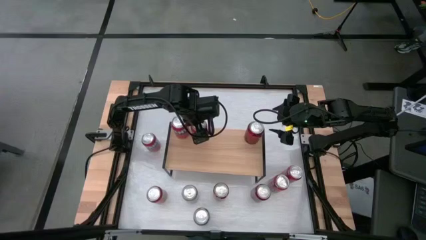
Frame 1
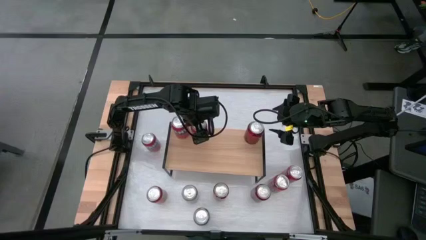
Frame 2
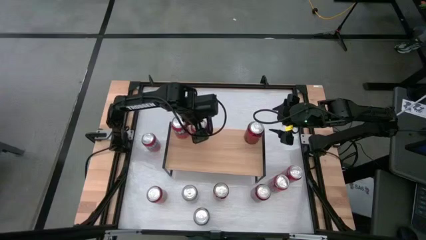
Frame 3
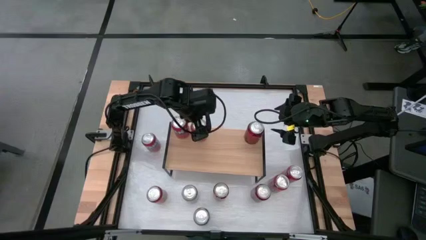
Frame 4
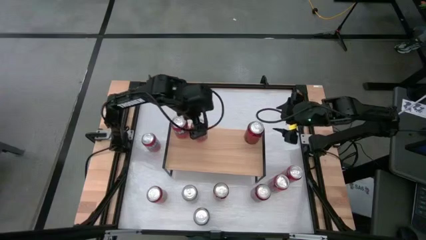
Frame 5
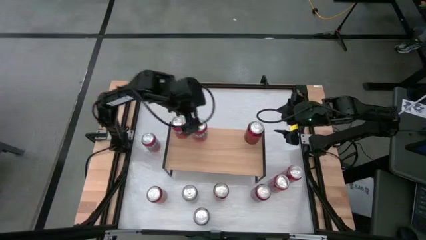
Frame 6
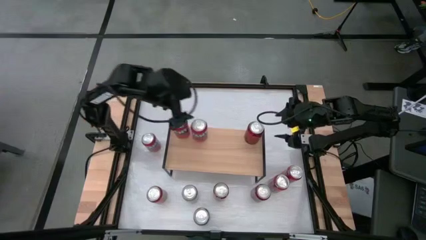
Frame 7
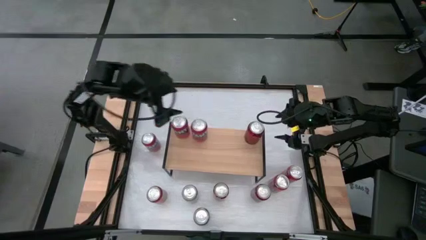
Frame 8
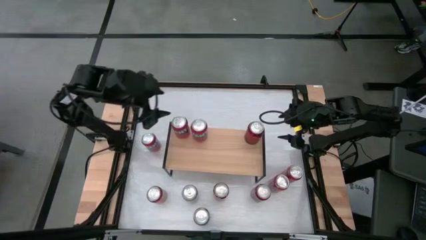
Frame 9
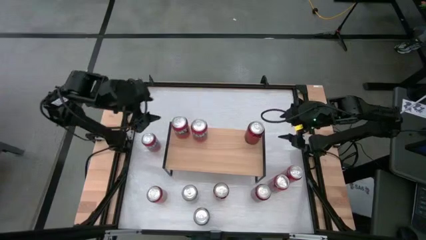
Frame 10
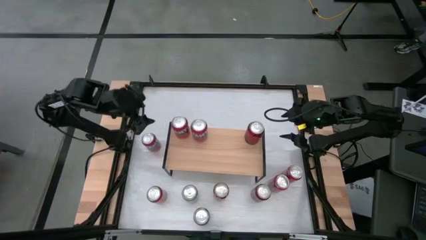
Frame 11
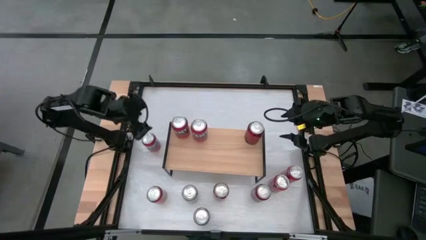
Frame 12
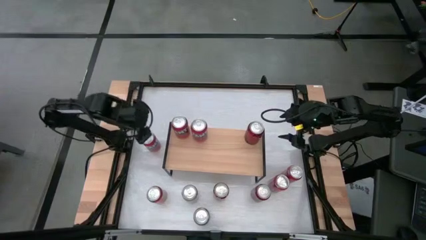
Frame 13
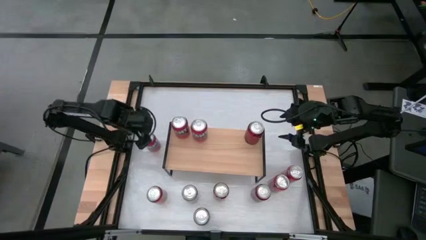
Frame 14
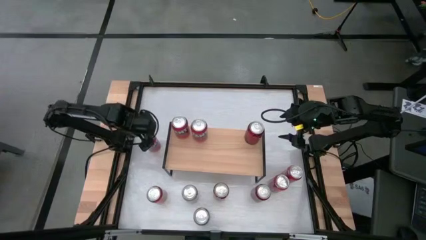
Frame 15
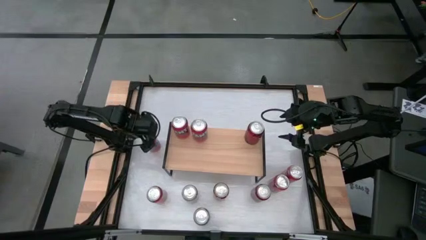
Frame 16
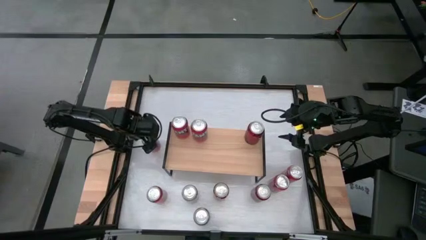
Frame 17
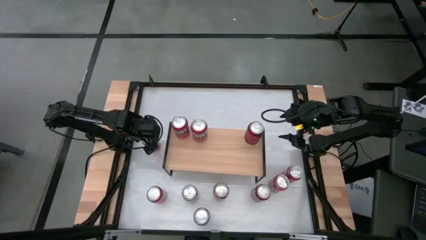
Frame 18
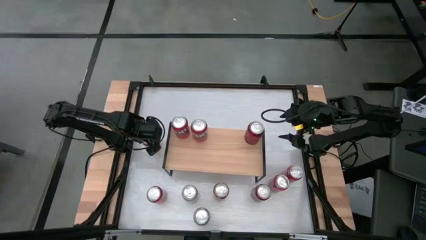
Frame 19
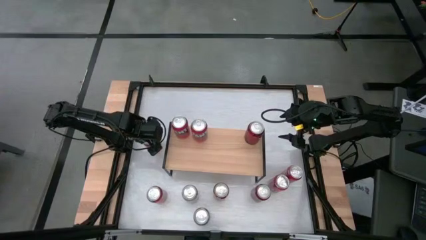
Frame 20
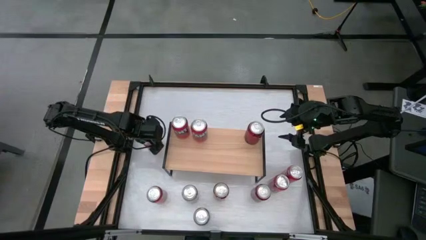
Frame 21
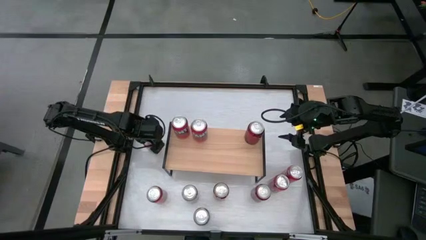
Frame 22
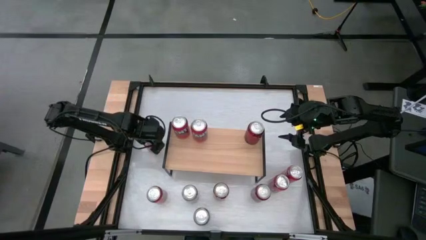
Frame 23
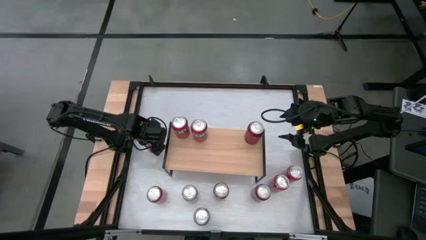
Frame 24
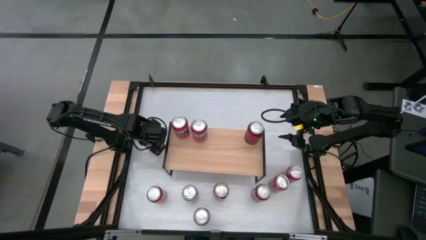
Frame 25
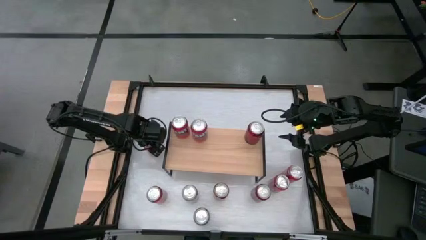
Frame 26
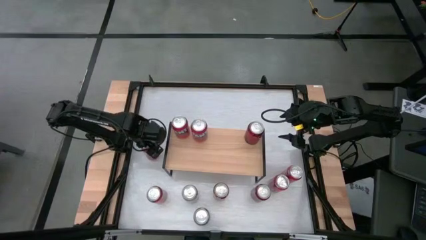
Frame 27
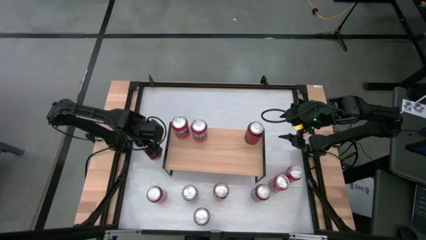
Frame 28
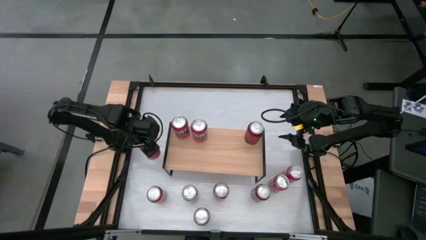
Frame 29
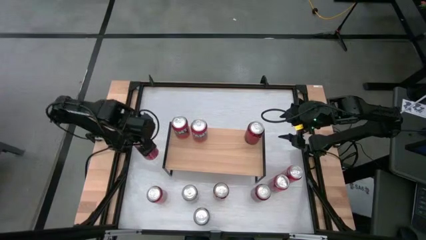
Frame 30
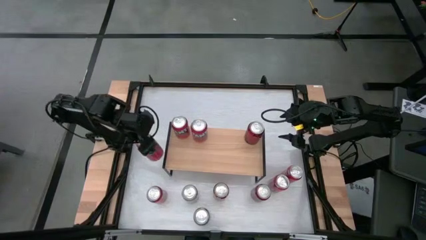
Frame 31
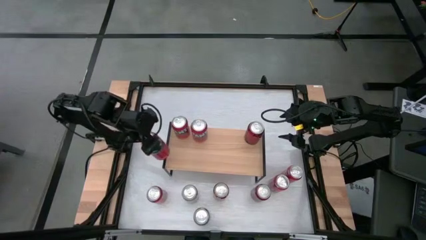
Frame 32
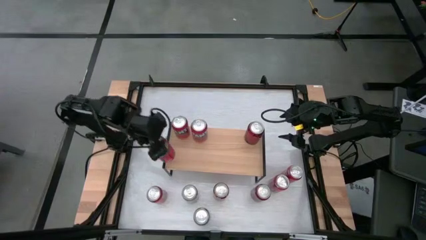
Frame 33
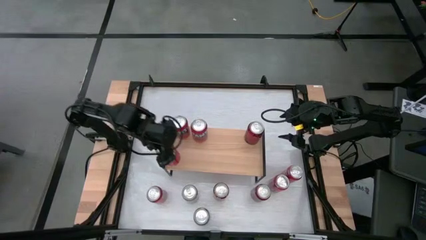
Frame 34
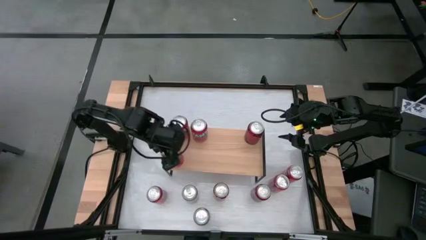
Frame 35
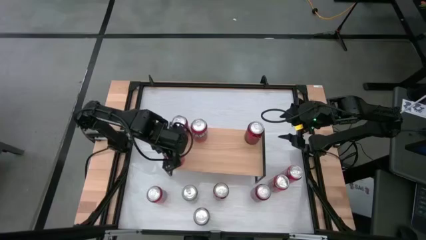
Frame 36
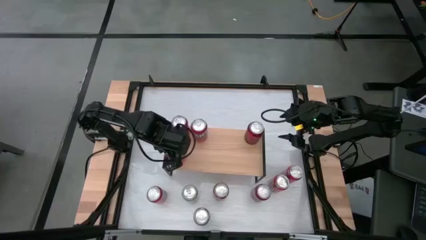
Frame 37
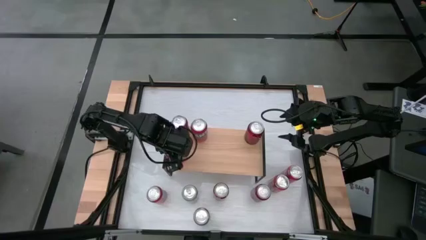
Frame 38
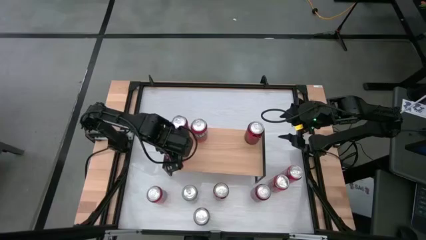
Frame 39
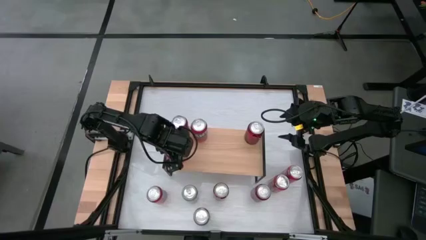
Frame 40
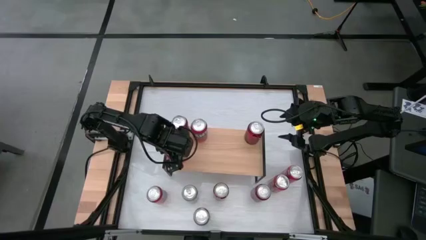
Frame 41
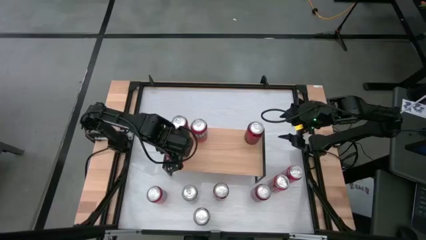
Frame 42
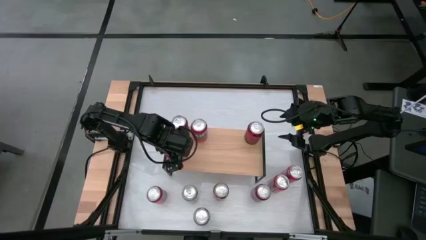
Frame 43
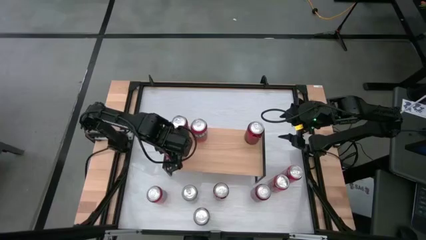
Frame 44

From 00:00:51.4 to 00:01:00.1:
Task: Place canned beverage on shelf
Put the red soda can on the shelf

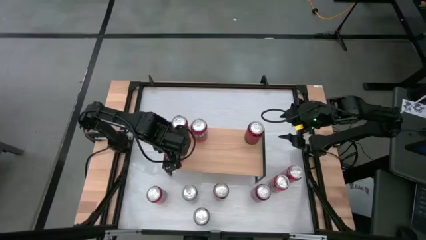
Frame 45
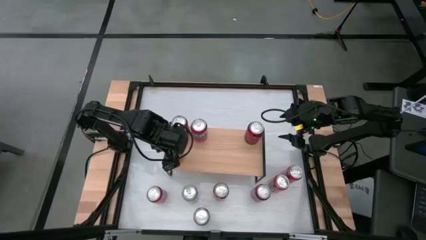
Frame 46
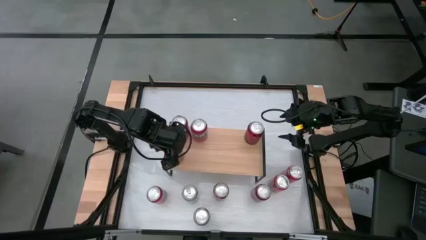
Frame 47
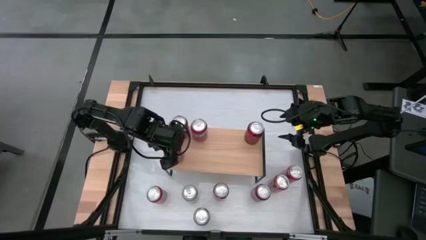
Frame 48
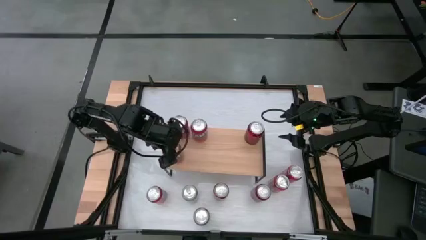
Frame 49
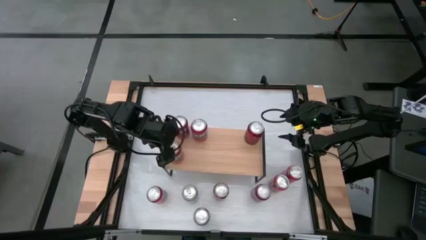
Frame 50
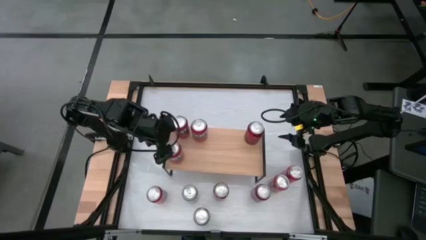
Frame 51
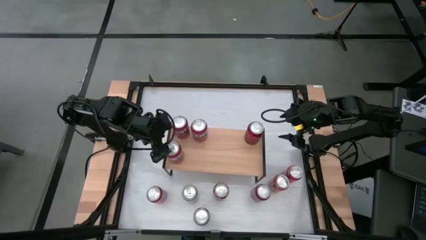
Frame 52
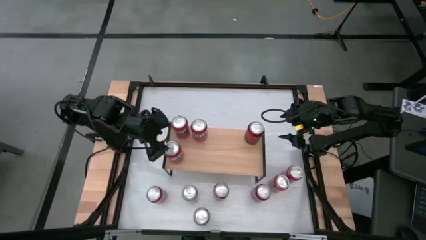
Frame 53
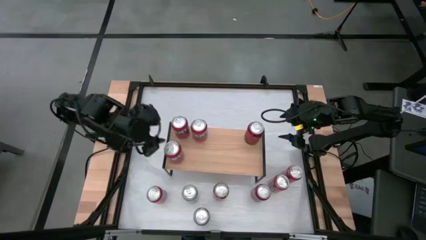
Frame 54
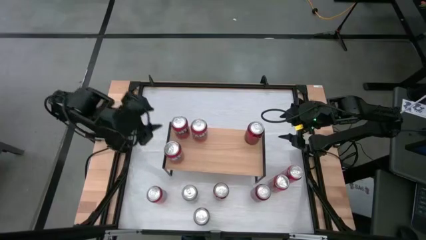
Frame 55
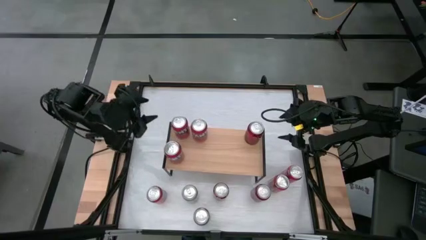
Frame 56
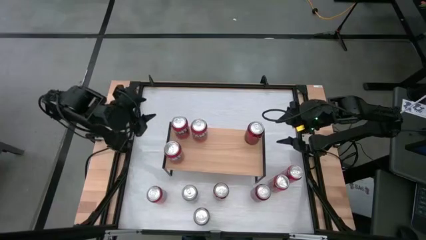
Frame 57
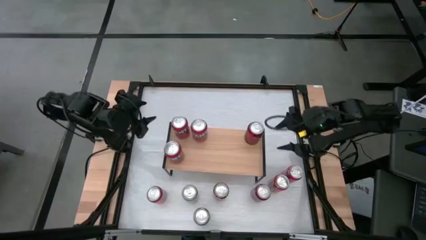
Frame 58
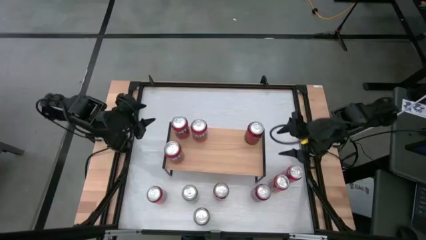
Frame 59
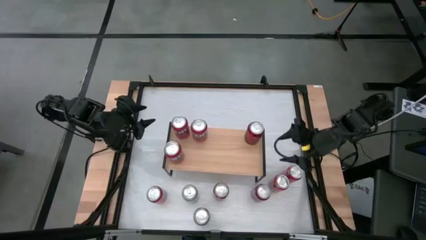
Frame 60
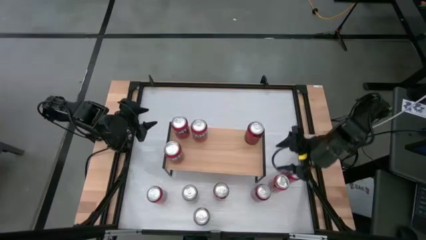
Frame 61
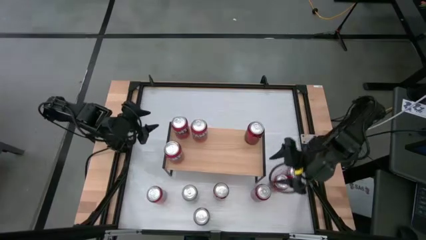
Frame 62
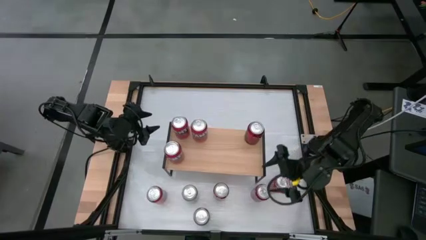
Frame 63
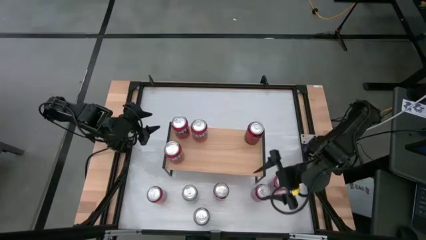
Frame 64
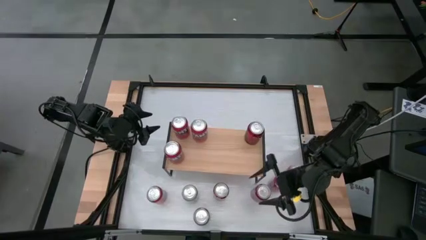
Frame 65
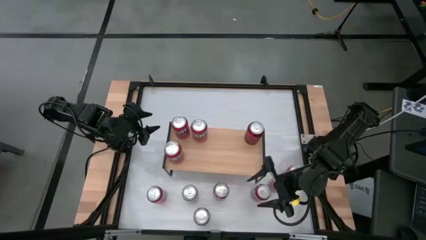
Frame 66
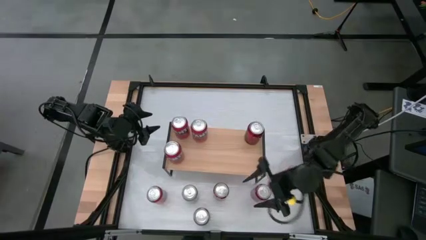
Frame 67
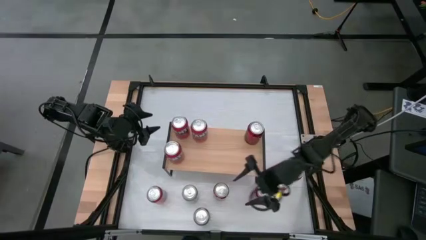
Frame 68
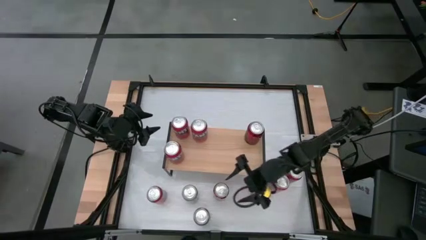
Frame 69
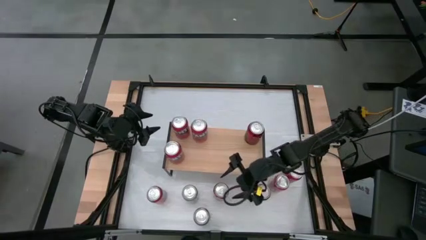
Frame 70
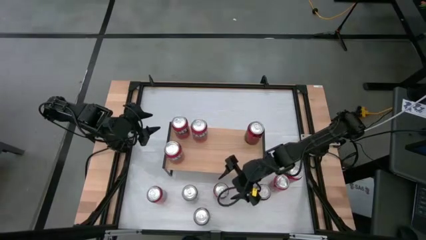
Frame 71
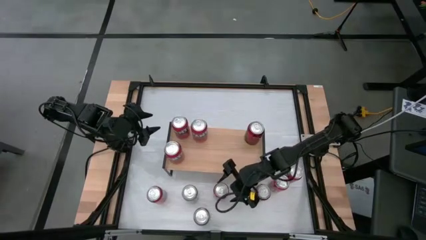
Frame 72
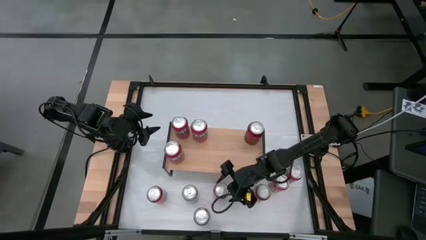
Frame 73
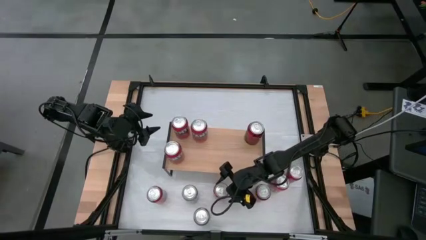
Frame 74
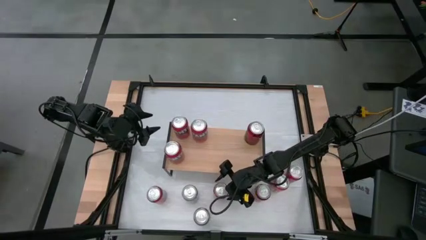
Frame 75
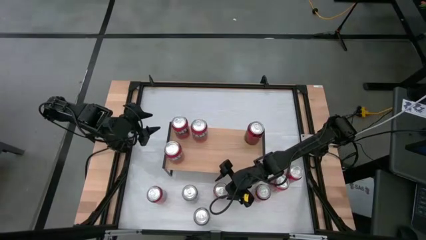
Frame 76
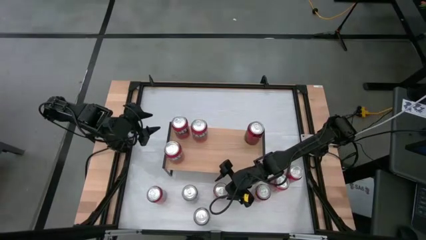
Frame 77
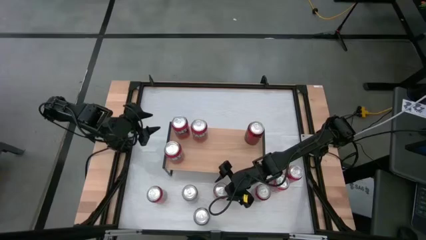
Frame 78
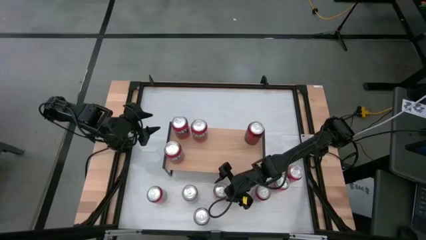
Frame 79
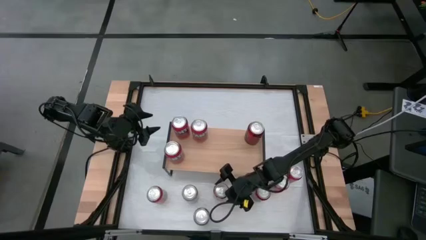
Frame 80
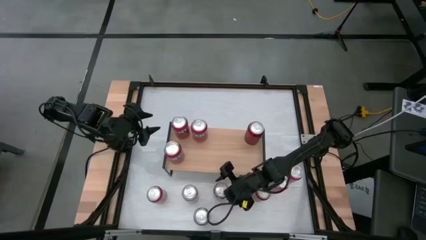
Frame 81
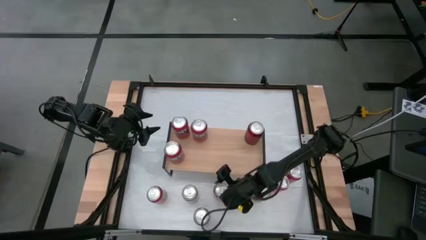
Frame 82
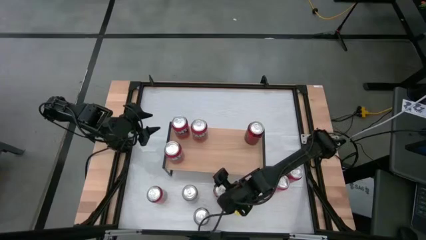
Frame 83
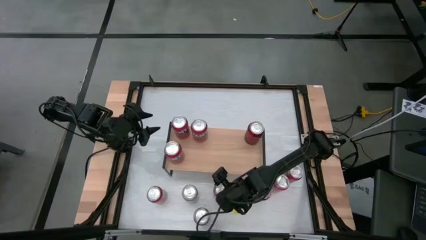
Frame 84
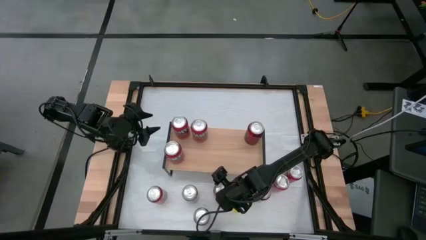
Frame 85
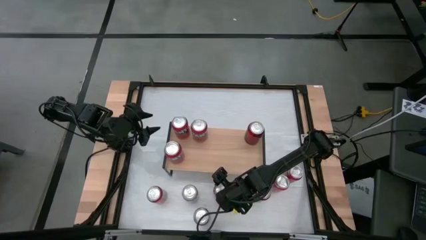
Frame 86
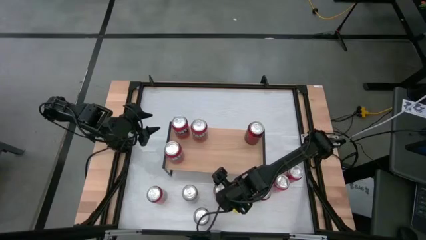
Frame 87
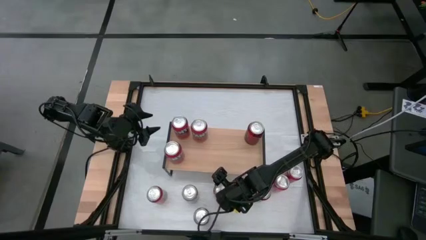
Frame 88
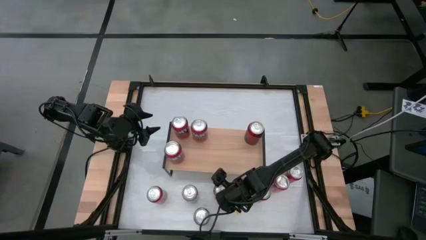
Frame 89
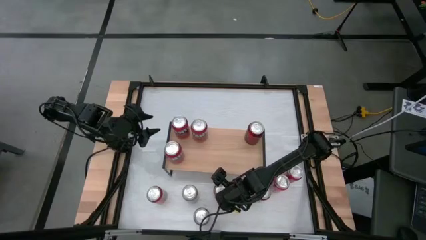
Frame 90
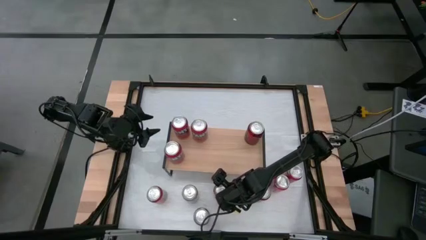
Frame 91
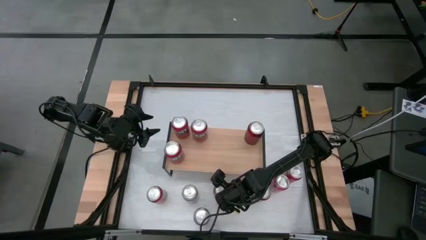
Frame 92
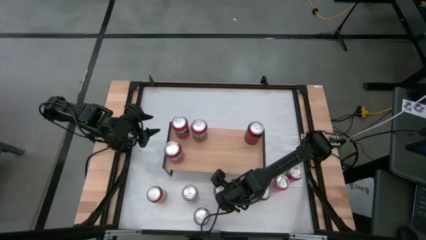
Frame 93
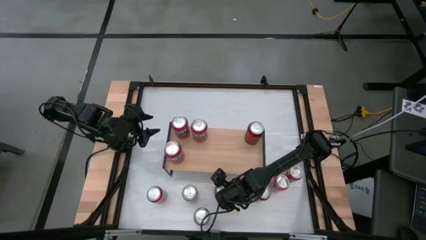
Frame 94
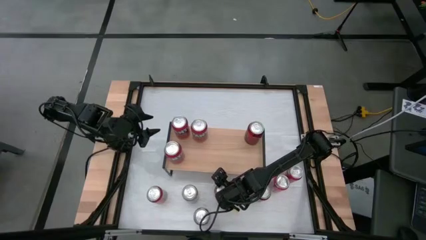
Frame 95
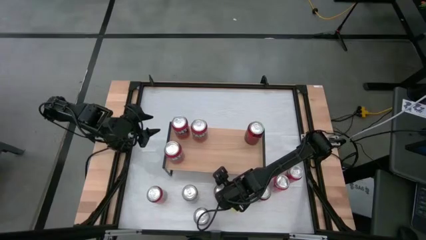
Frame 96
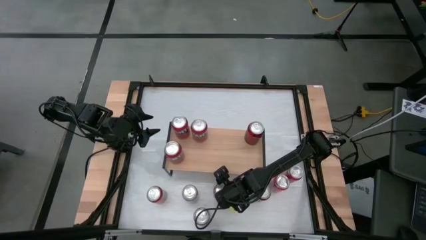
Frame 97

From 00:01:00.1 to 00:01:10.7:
Put the red white soda can on the shelf
